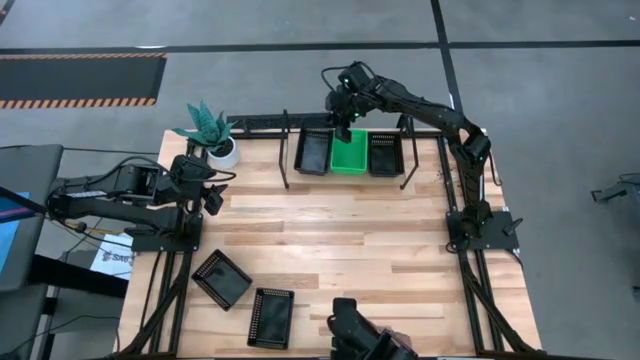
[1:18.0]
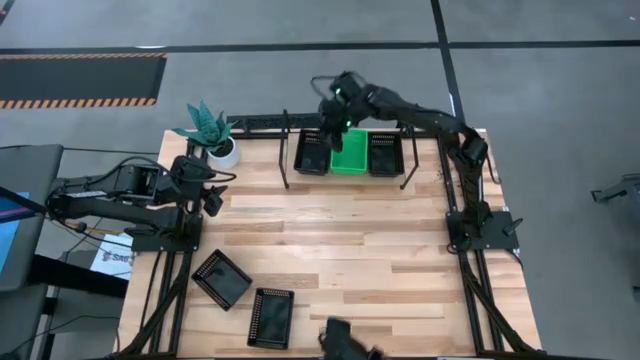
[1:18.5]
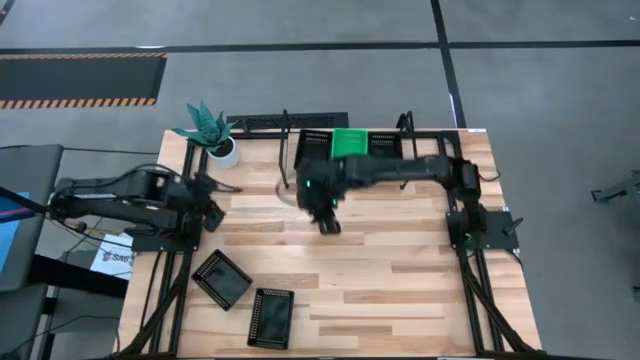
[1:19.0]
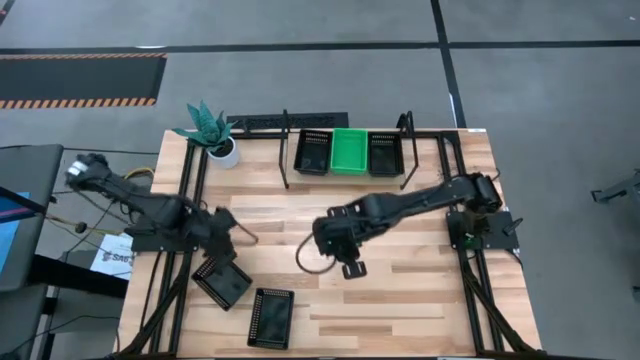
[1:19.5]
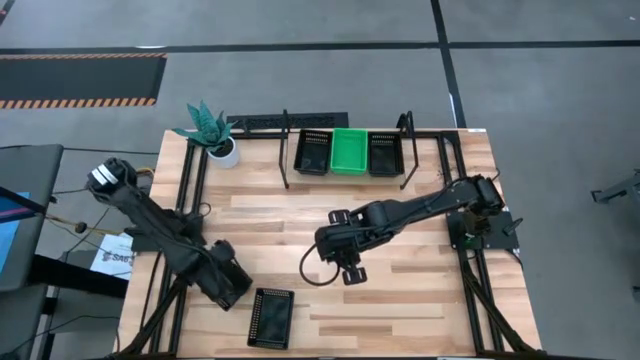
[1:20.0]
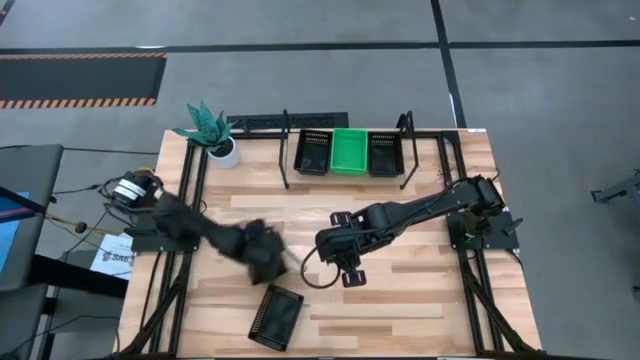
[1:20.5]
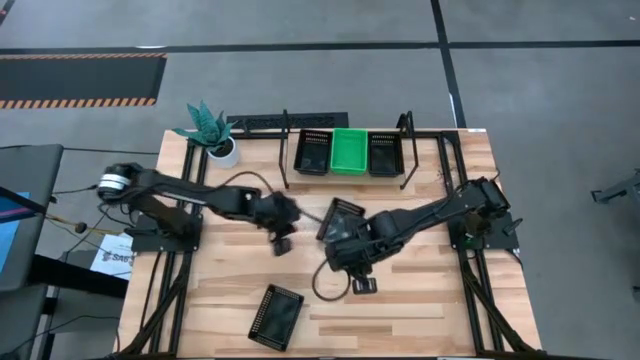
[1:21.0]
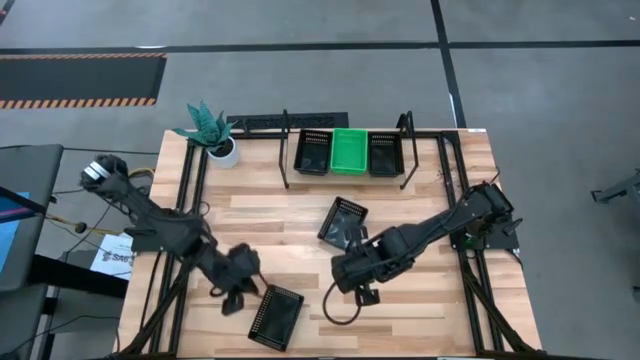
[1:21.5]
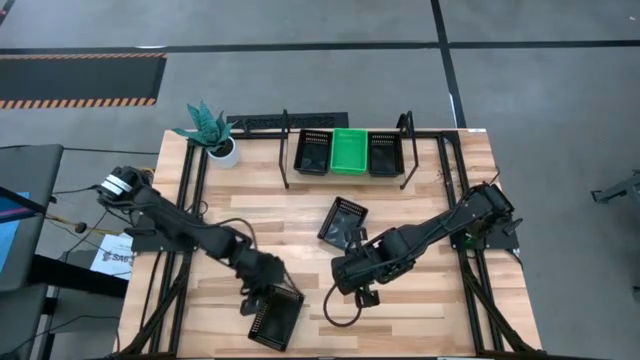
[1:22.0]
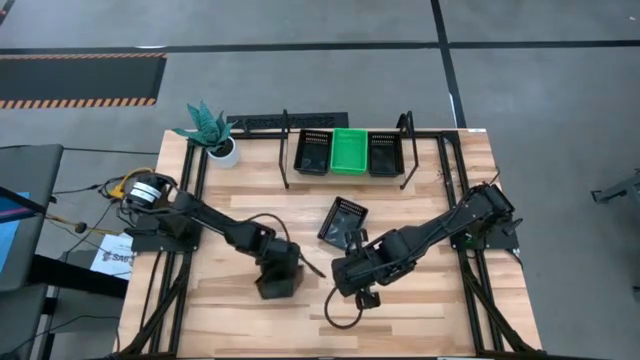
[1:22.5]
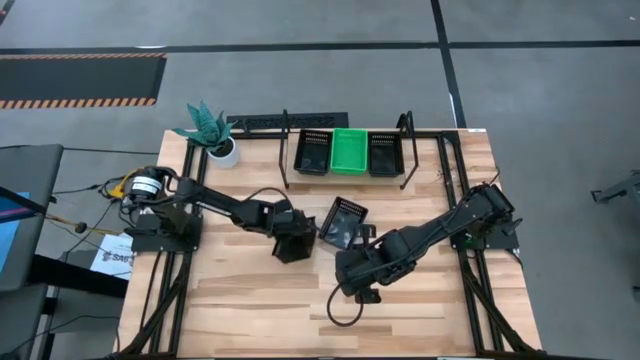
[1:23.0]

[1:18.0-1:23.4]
Task: Stack baskets on shelf by color
Move the black baskets to the center of the table

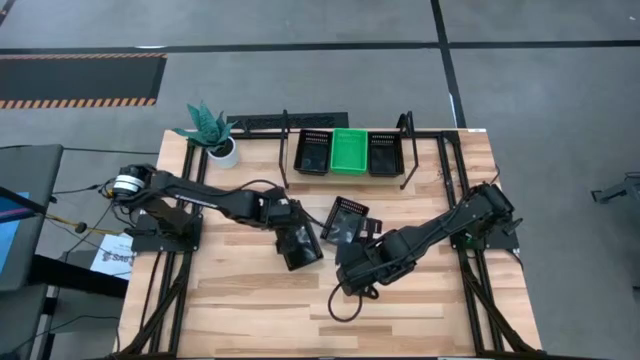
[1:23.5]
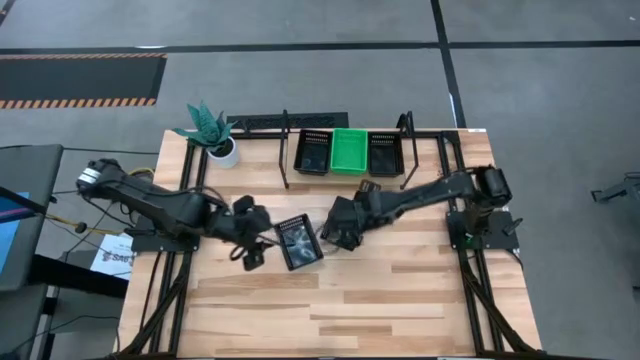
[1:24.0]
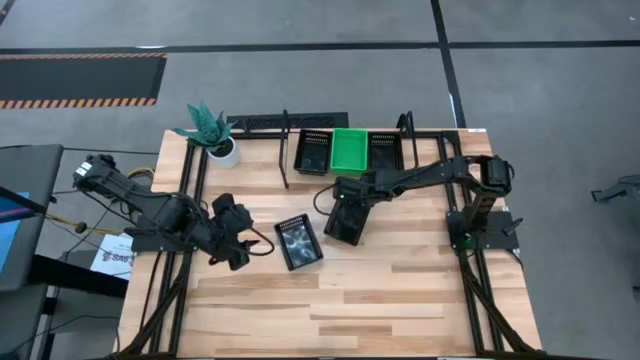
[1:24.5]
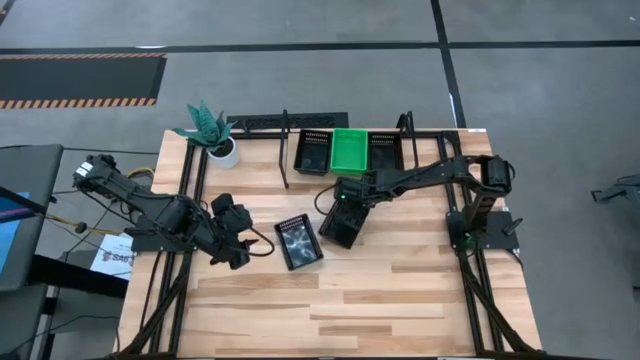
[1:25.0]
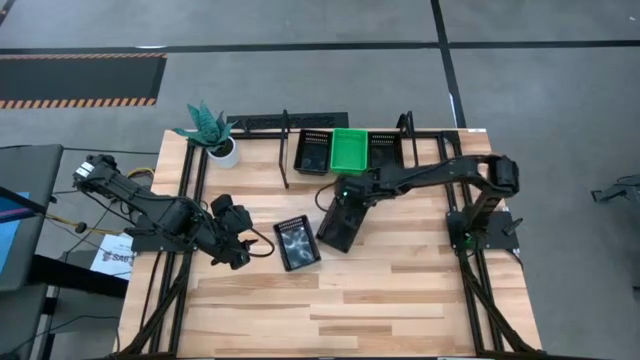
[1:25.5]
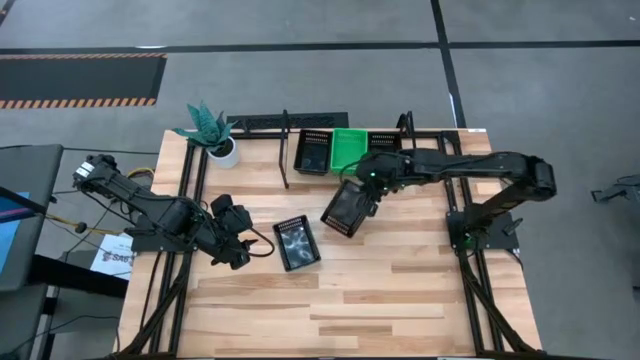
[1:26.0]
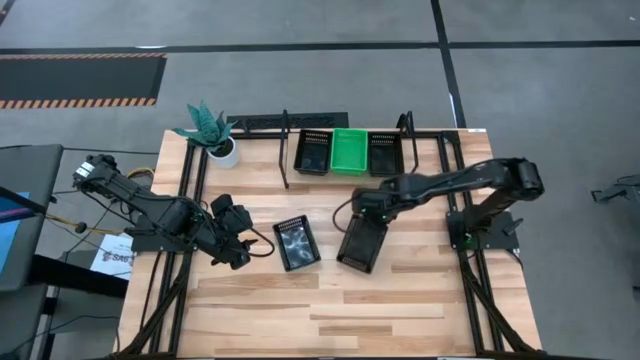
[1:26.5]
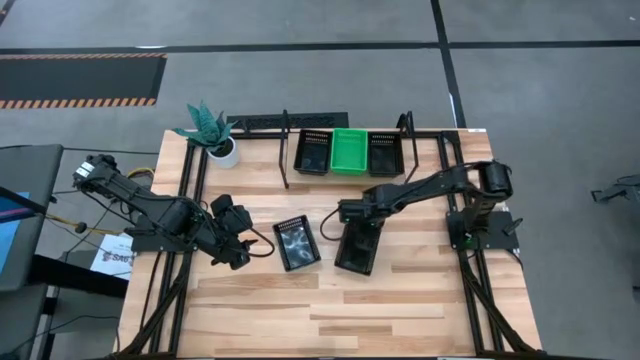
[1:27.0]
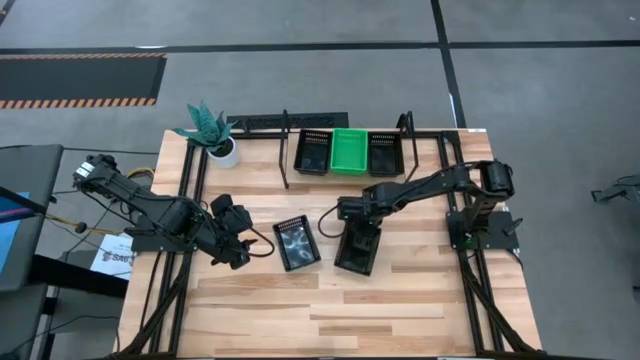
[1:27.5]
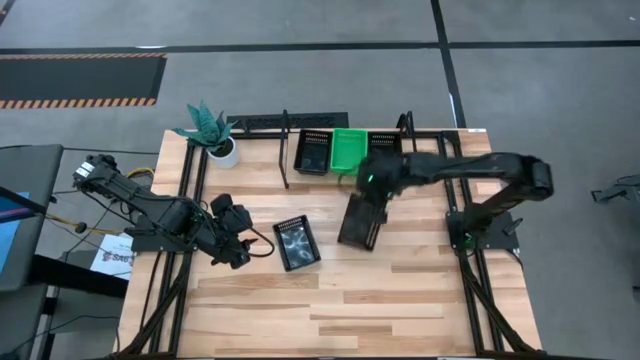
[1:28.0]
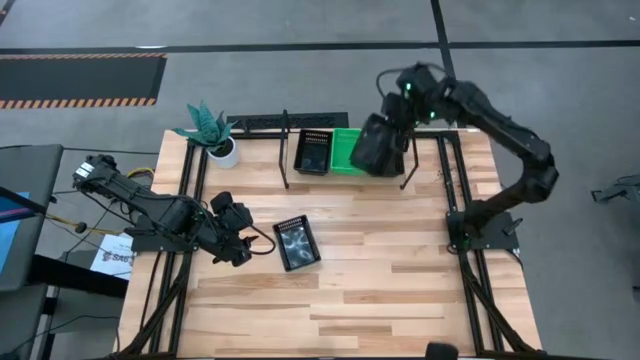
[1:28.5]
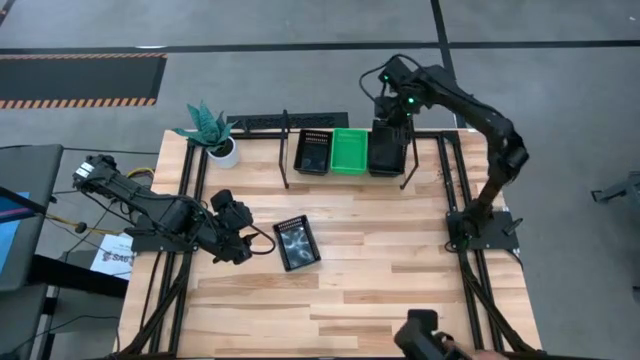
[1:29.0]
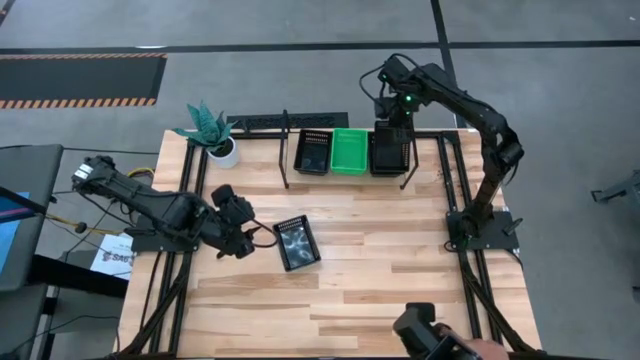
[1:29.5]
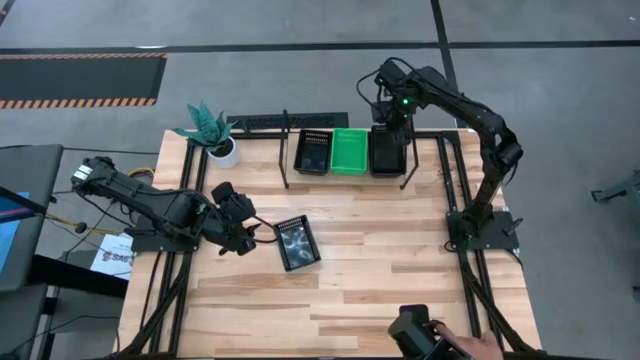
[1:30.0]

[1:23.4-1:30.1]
Stack the black basket on top of the black basket on the shelf

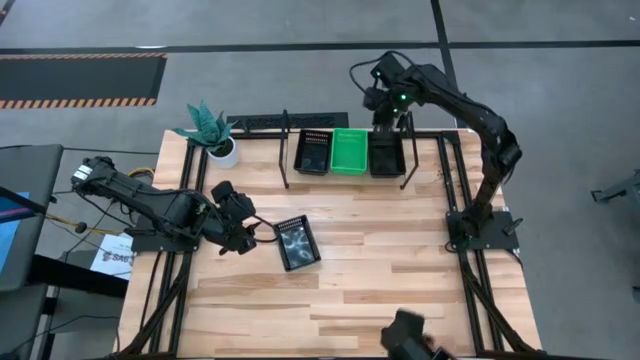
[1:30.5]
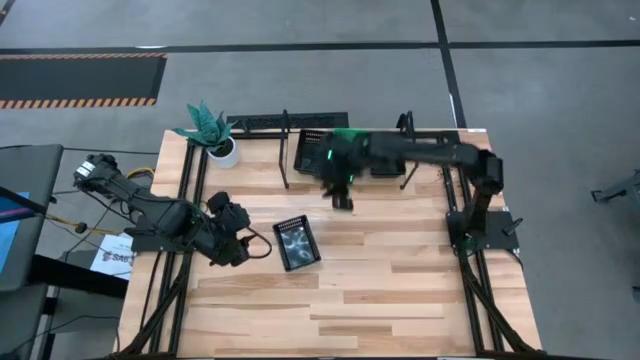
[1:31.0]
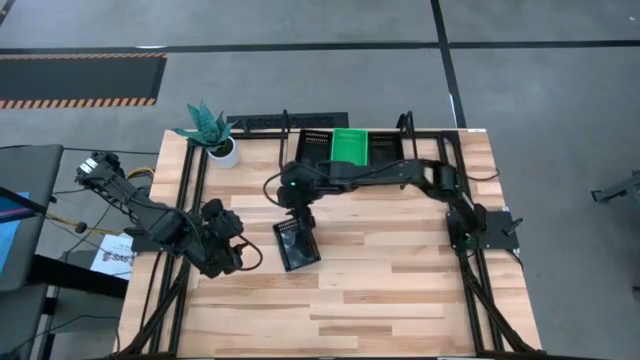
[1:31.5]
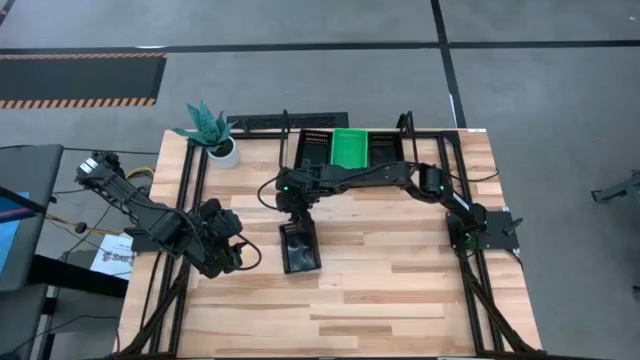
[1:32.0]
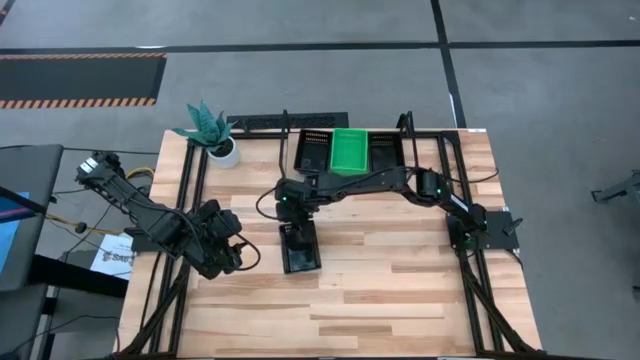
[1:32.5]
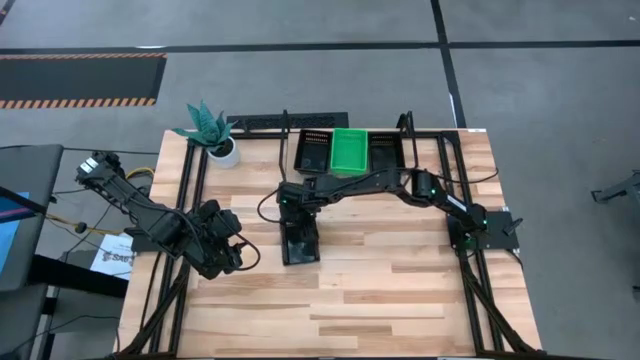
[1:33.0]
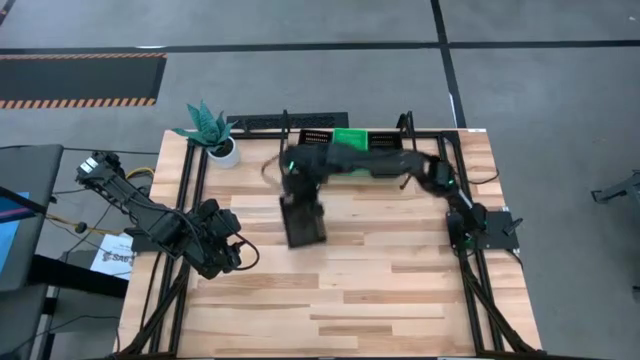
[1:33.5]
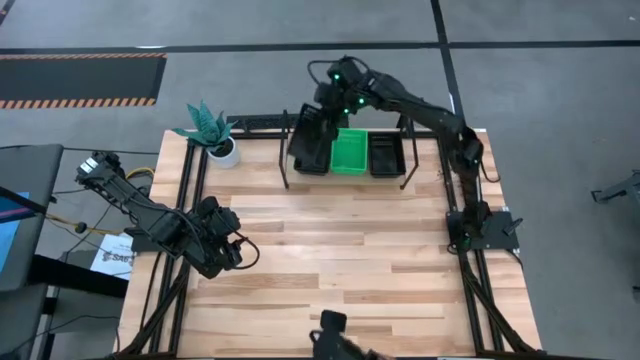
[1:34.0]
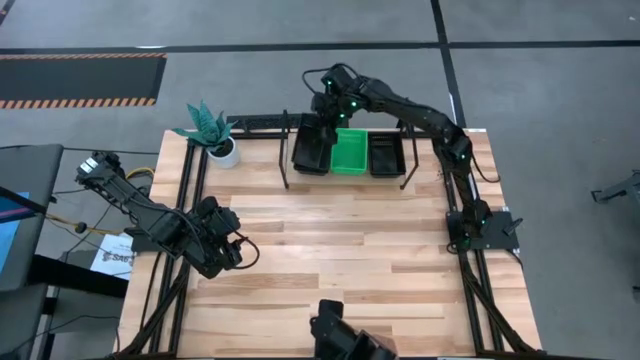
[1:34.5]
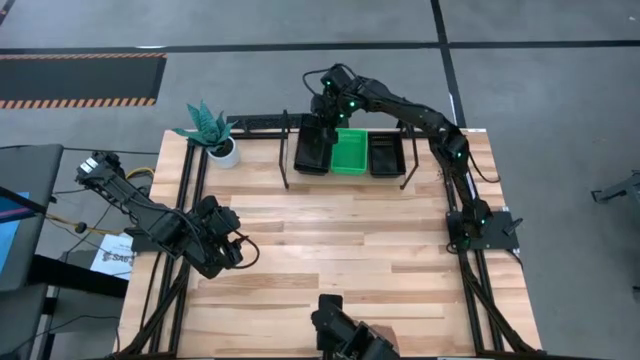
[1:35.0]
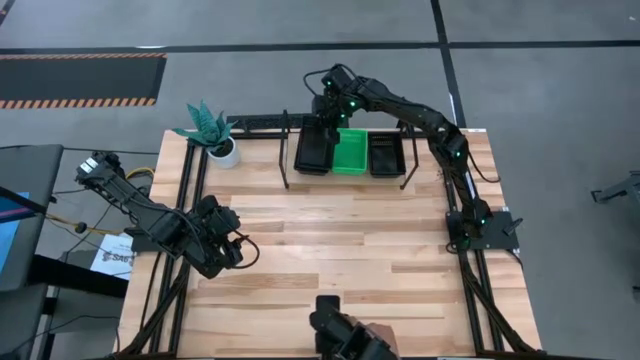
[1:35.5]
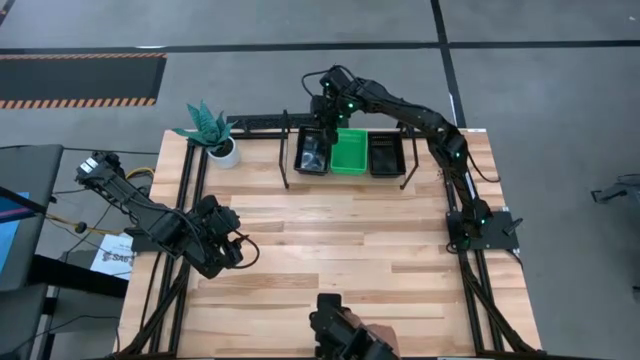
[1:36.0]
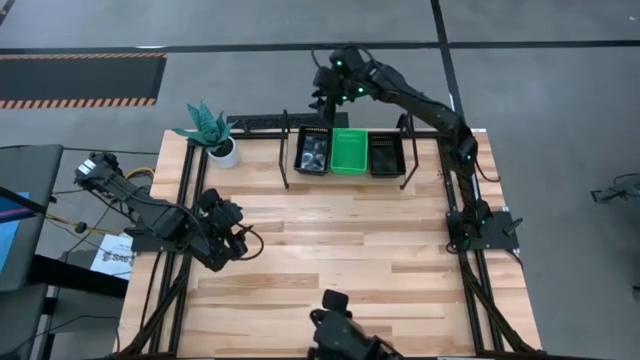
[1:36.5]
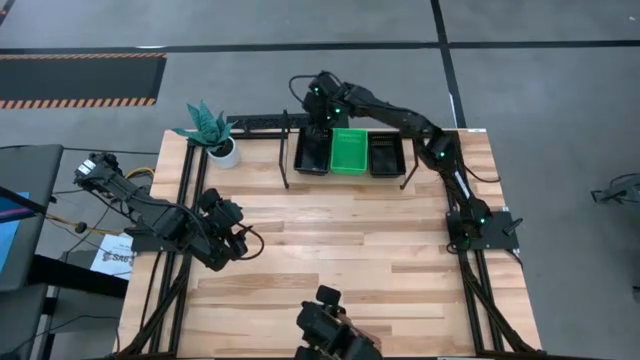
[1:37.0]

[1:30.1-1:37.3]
Stack the black basket on top of the black basket on the shelf

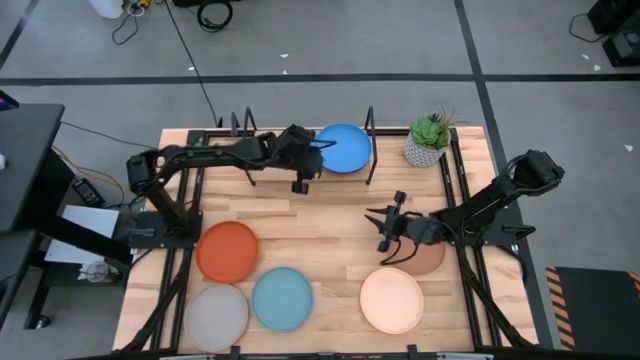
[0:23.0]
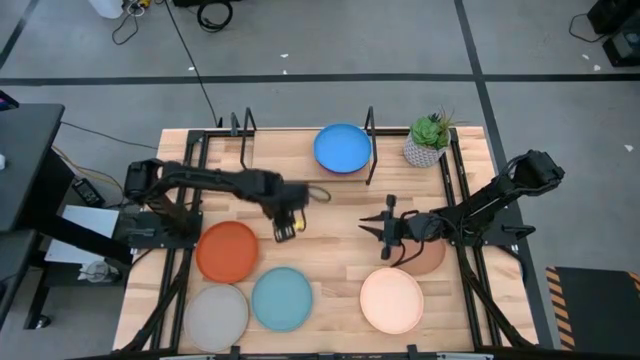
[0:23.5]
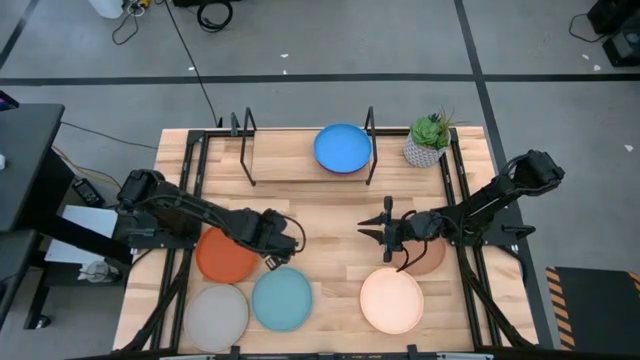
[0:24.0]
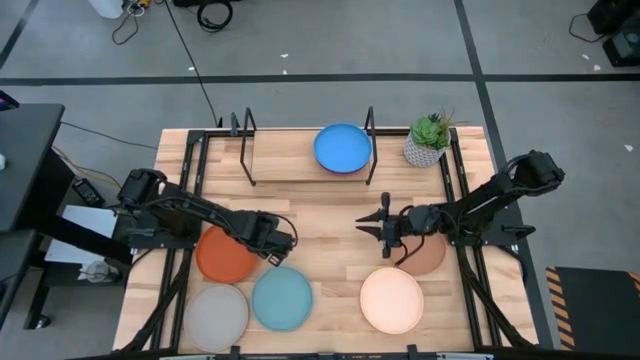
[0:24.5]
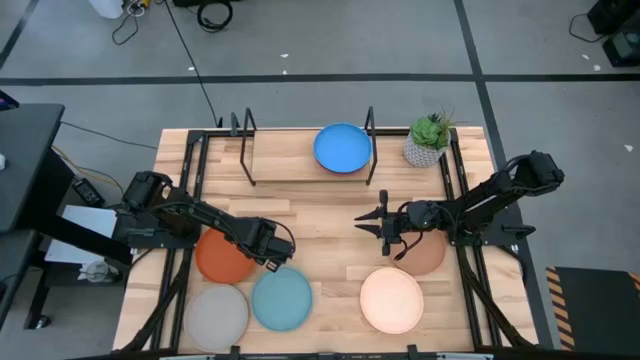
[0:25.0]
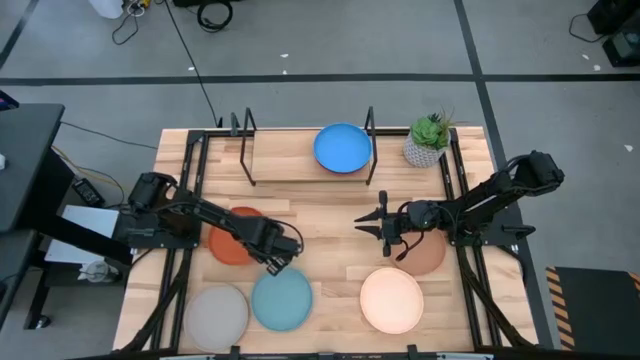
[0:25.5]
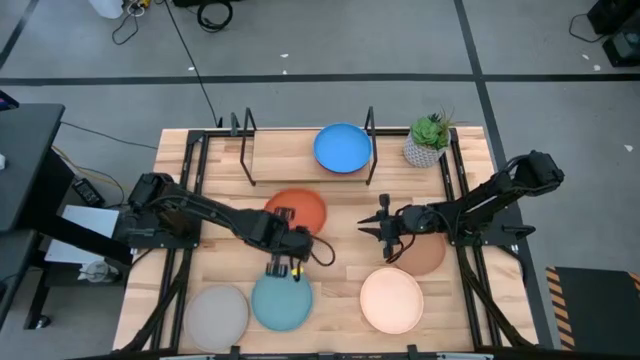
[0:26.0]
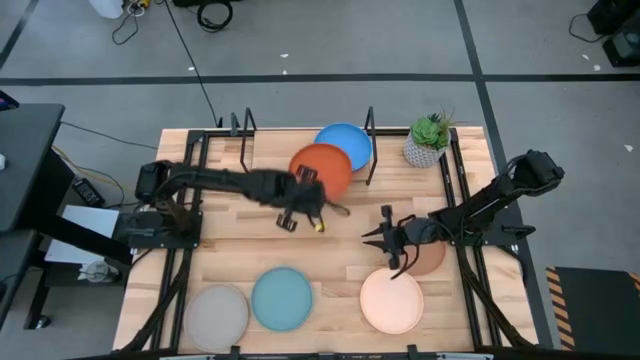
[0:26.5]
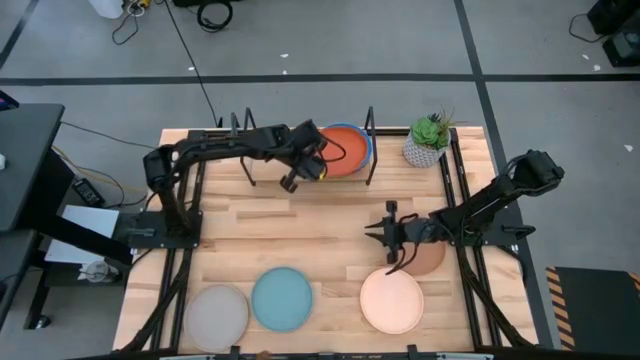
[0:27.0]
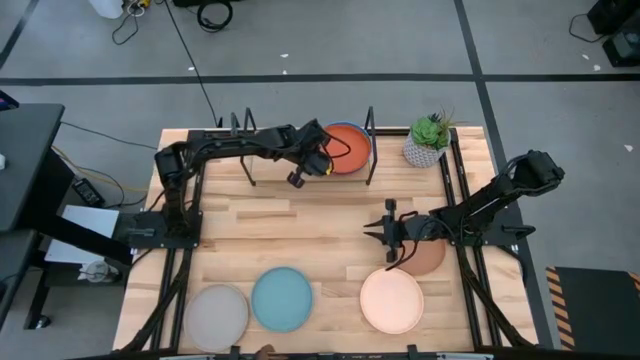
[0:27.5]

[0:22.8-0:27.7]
Task: Place and stack plates onto a shelf
Stack the orange plate on top of the blue plate on the shelf
